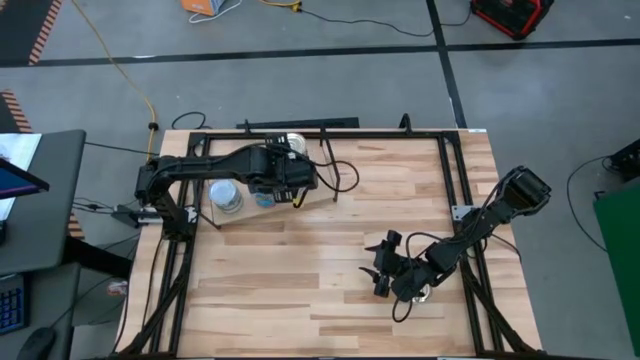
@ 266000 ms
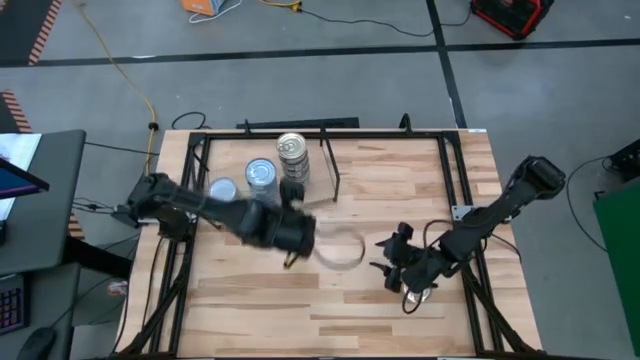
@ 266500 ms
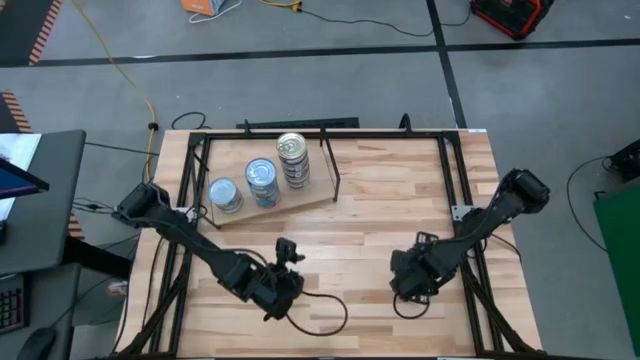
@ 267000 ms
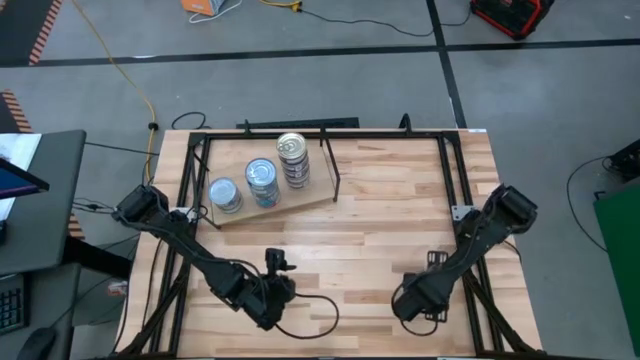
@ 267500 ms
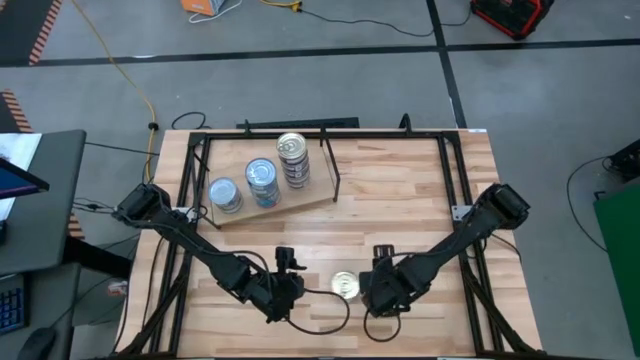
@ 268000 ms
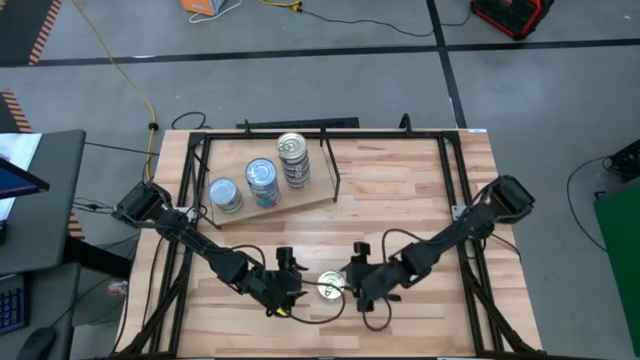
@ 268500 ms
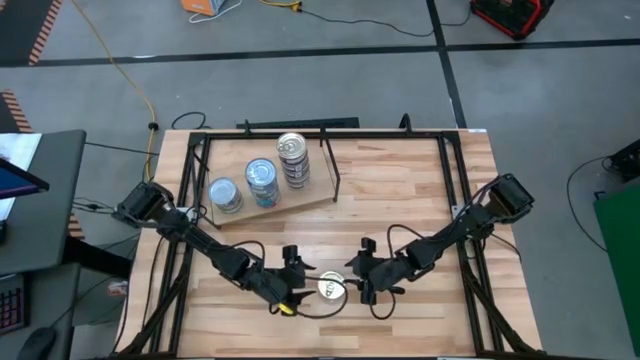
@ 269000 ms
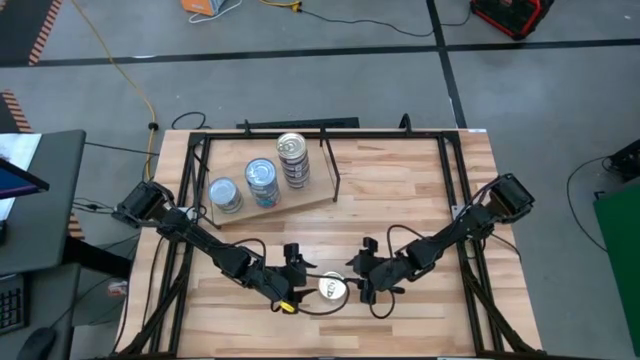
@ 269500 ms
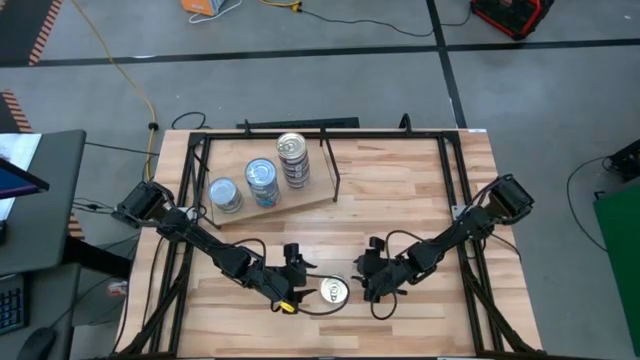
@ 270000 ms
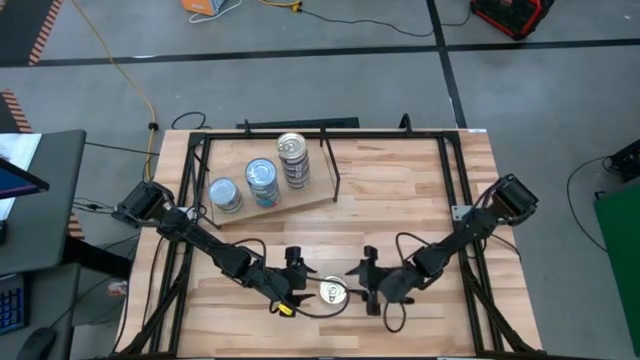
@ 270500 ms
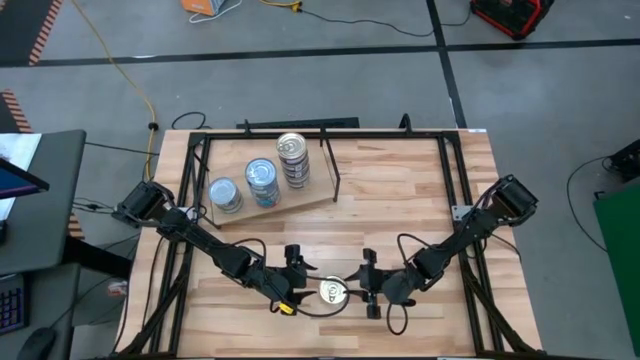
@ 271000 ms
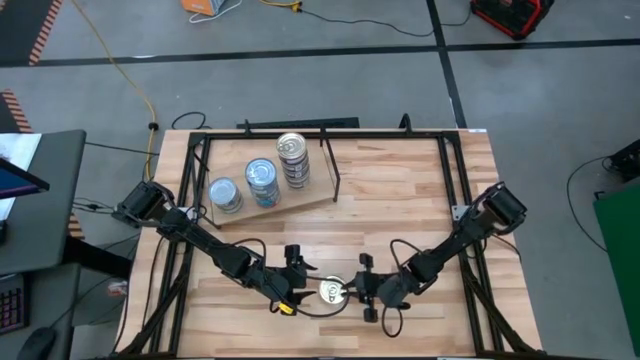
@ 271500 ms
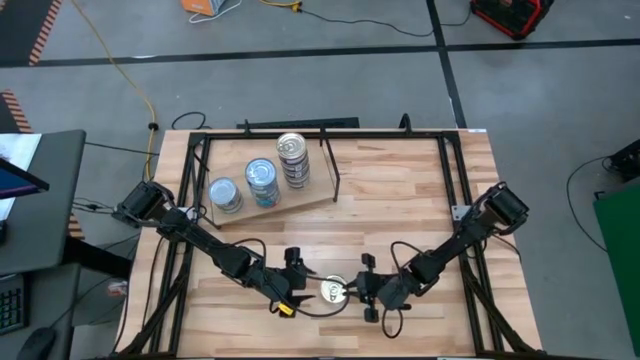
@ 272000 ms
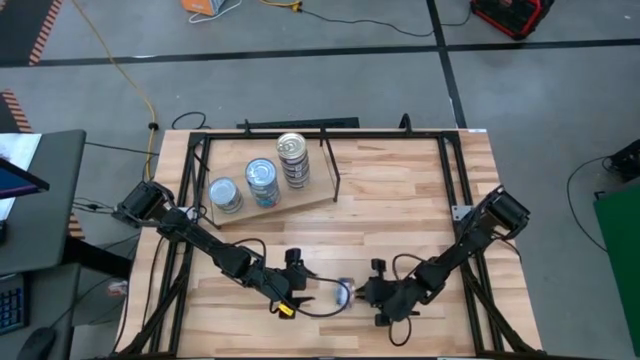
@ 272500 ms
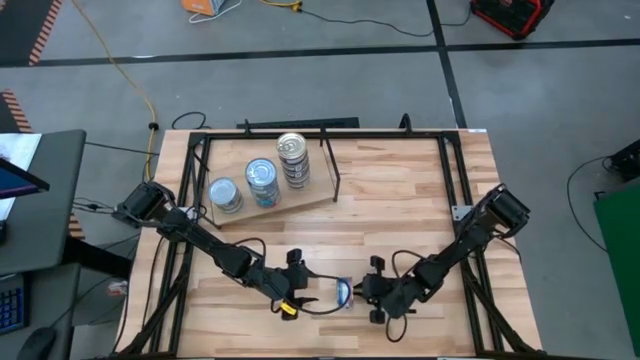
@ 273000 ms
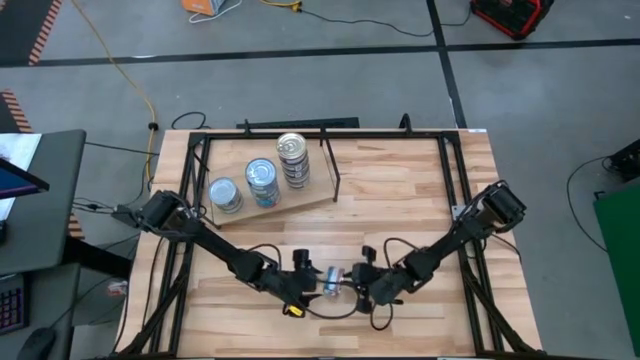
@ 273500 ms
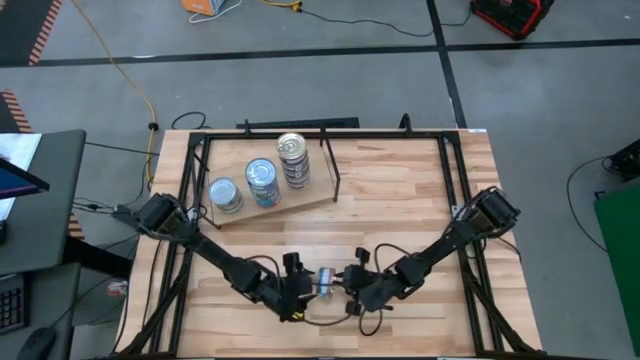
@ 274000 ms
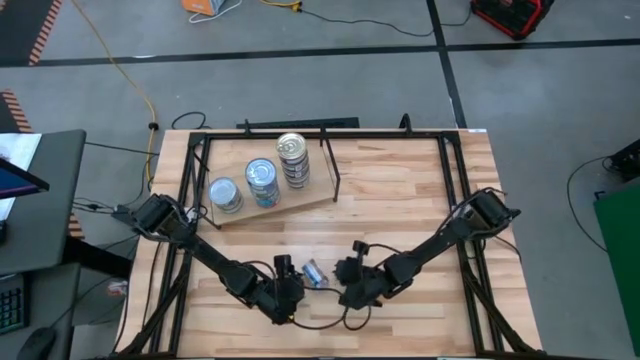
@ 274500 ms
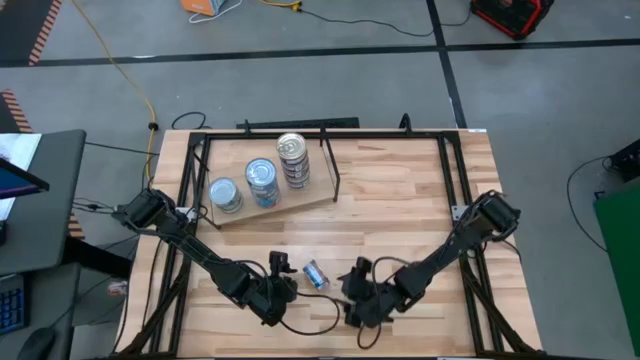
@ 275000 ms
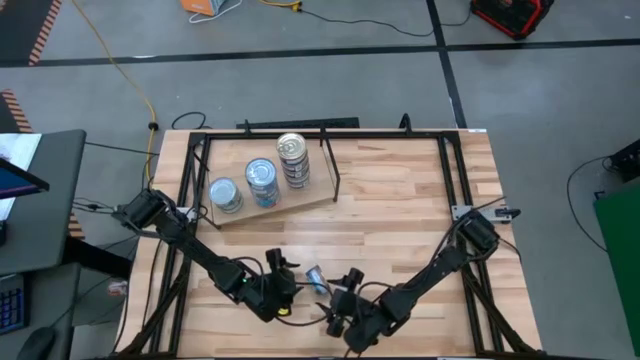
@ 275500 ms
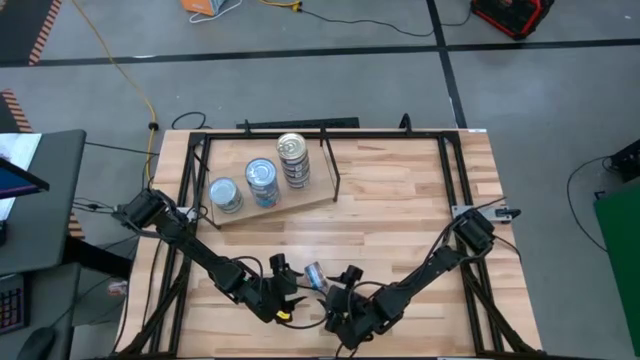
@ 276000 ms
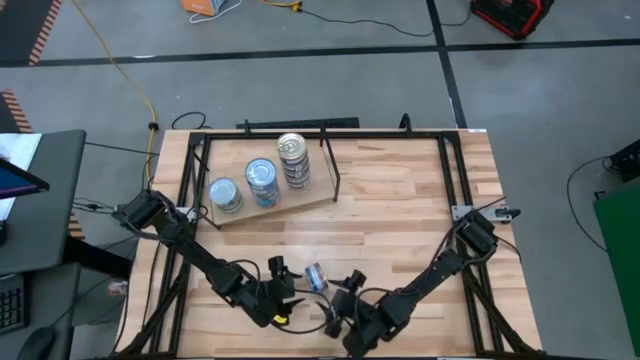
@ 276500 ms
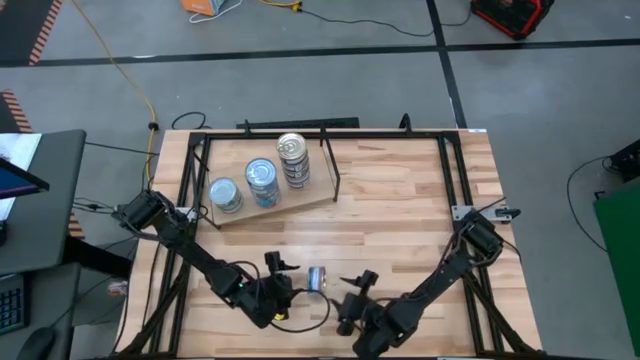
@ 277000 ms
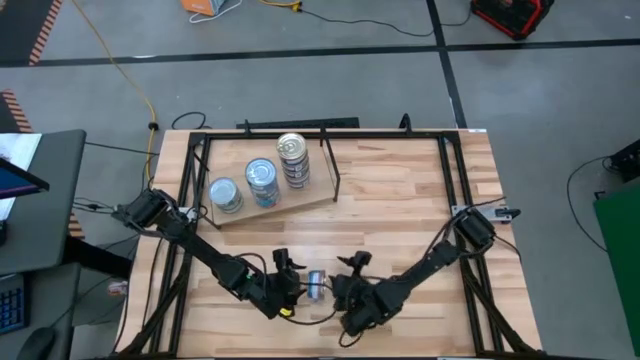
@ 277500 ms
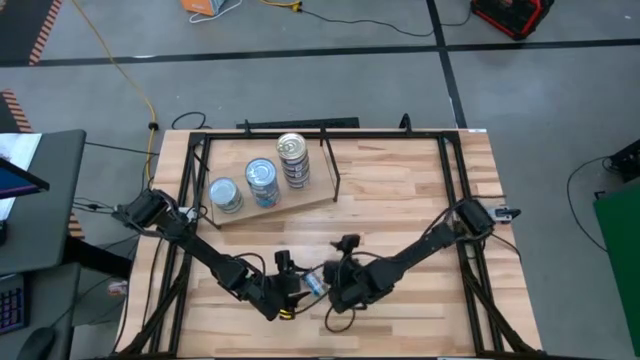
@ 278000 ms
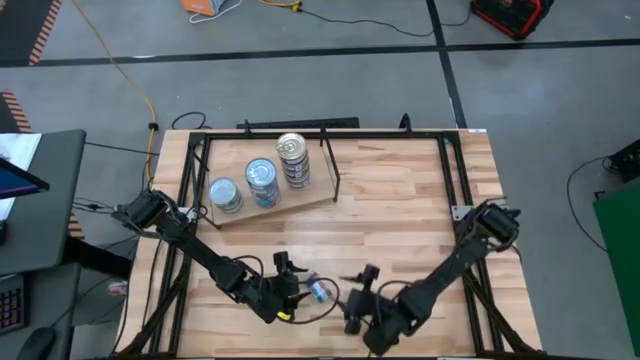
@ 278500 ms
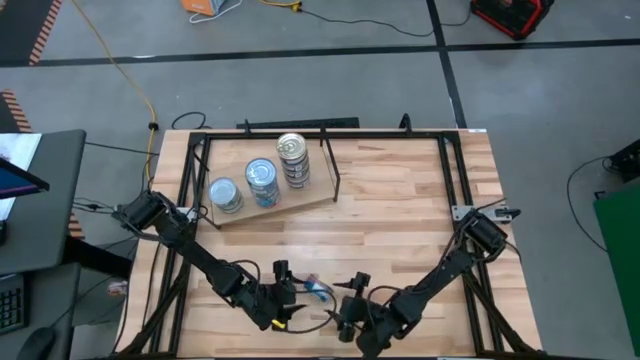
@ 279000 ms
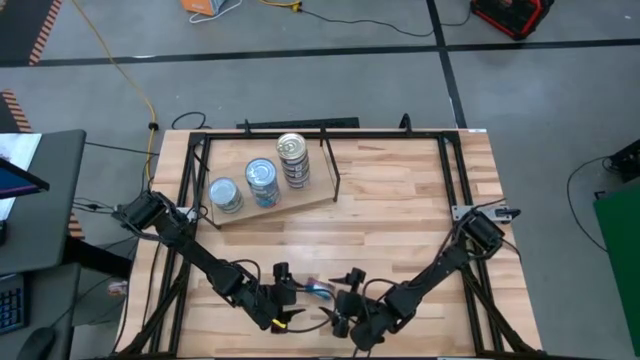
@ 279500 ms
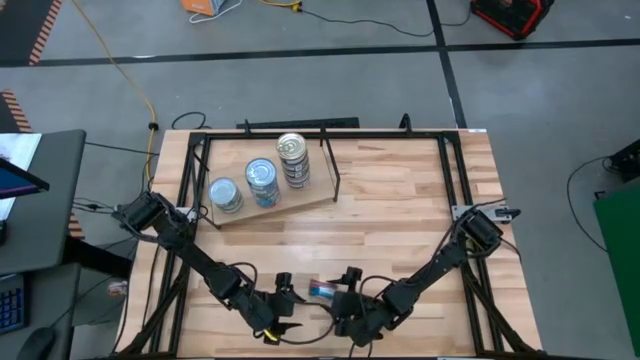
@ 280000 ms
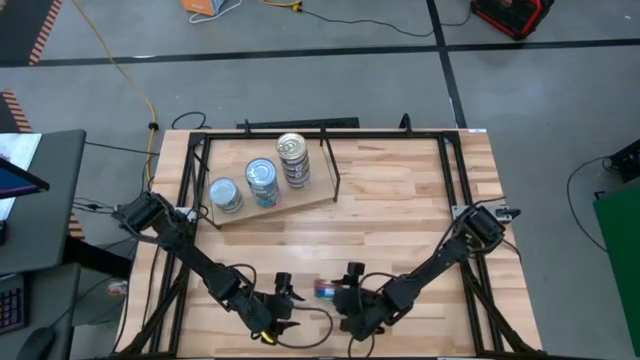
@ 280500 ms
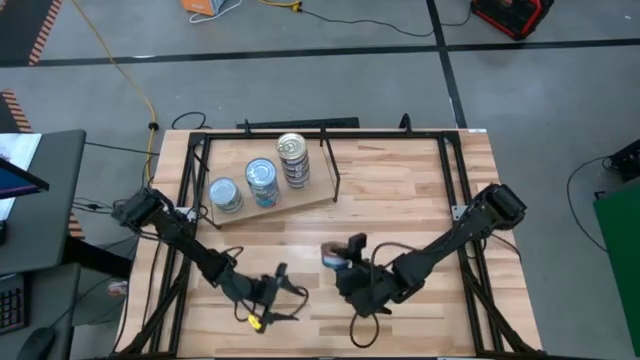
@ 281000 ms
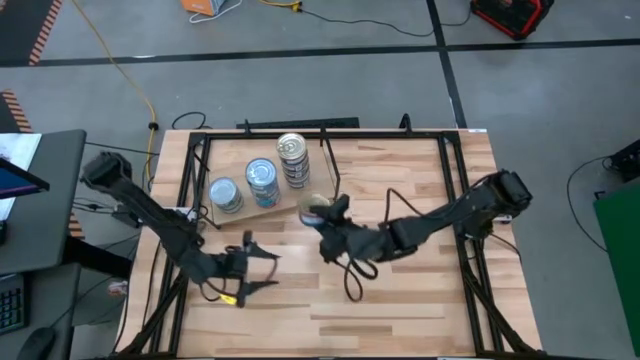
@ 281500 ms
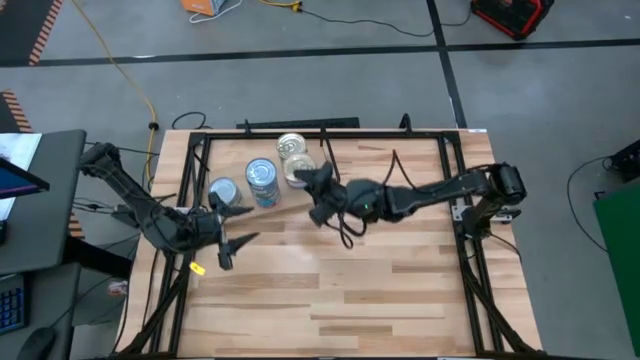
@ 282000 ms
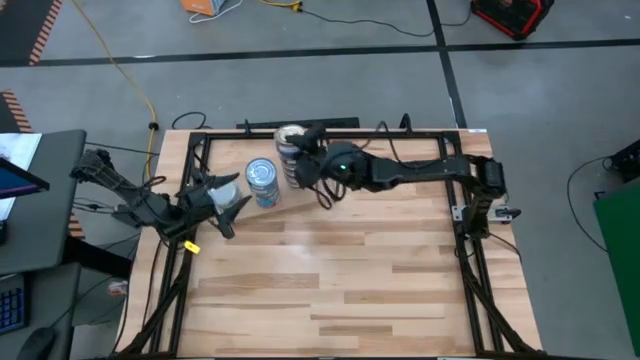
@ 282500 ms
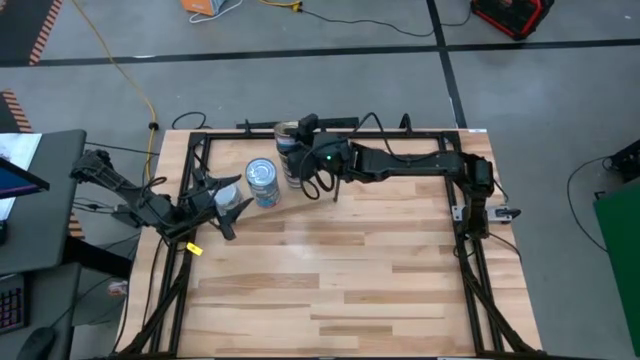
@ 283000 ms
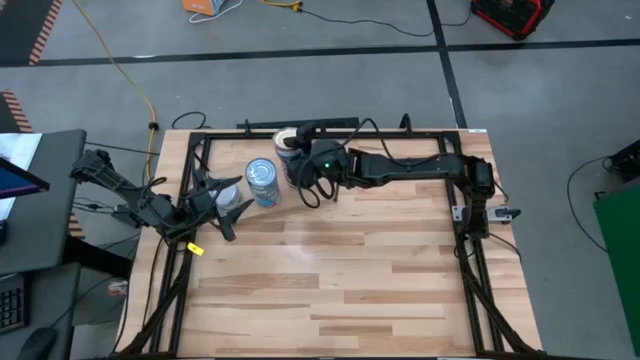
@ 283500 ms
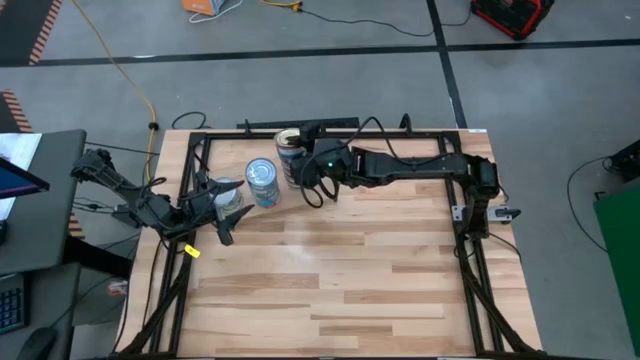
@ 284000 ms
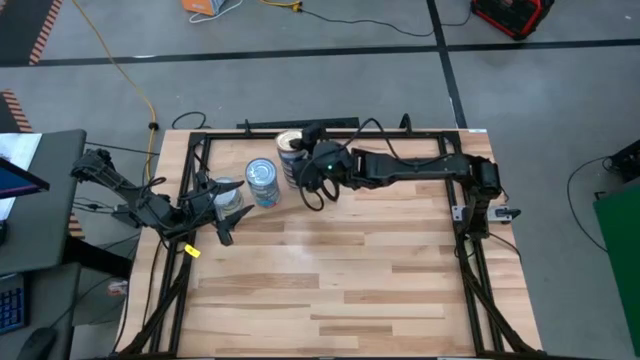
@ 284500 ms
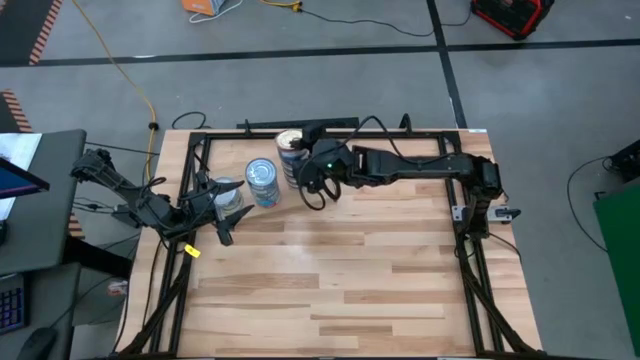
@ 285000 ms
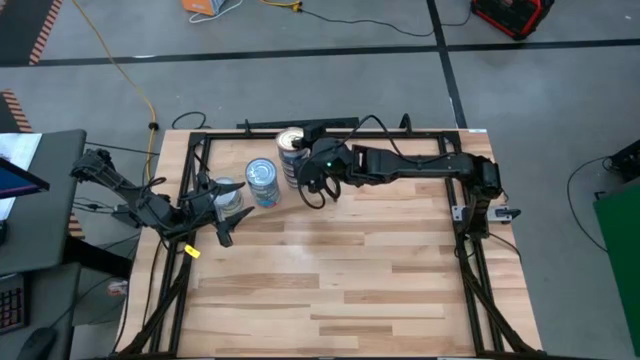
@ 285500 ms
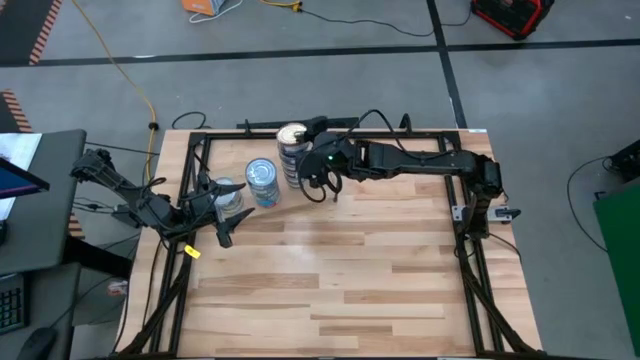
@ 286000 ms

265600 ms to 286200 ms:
Task: Stack canned seafood by type on shelf
Stack the blue pink tuna can on top of the blue pink tuna can on the shelf

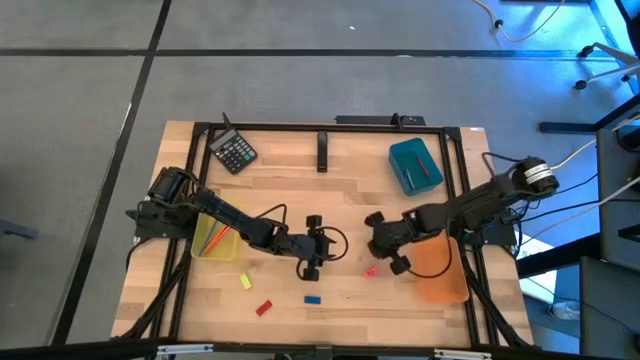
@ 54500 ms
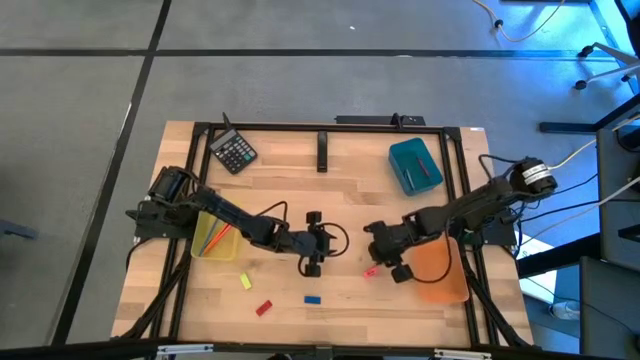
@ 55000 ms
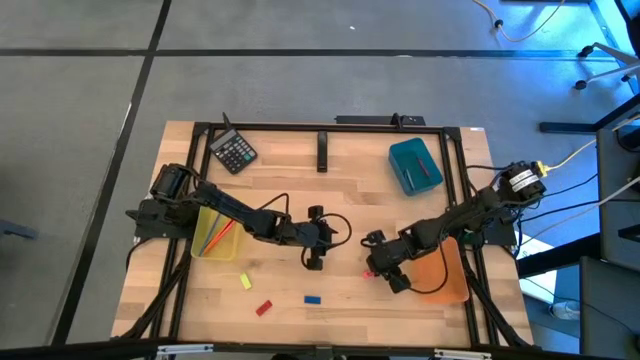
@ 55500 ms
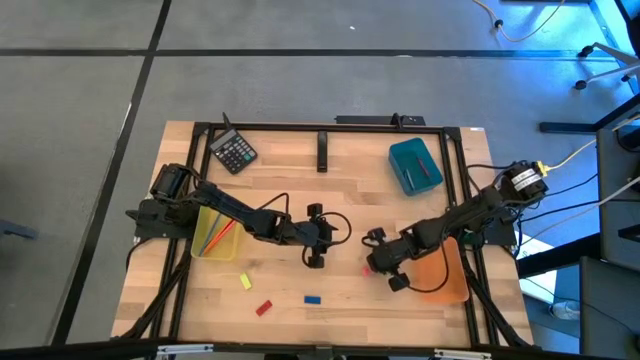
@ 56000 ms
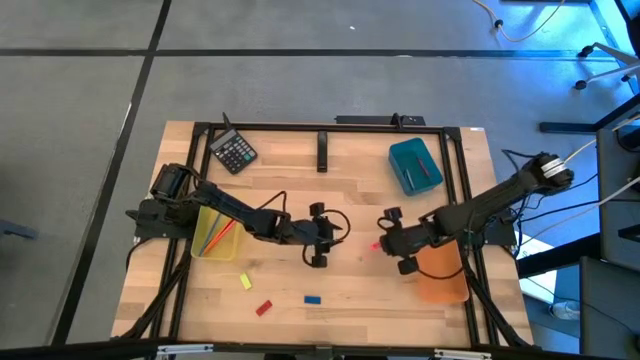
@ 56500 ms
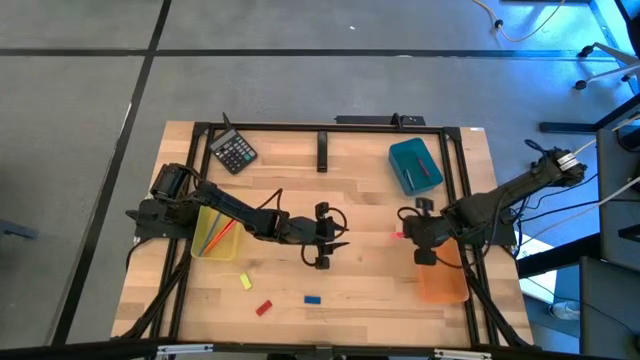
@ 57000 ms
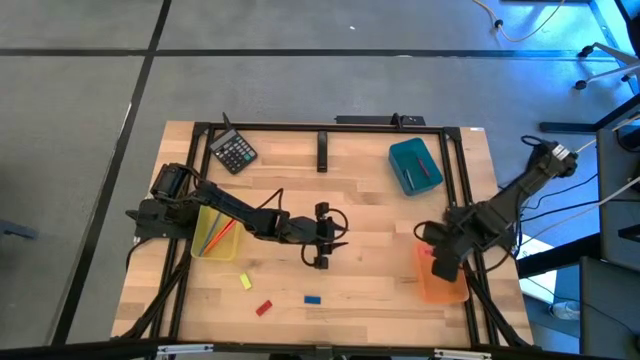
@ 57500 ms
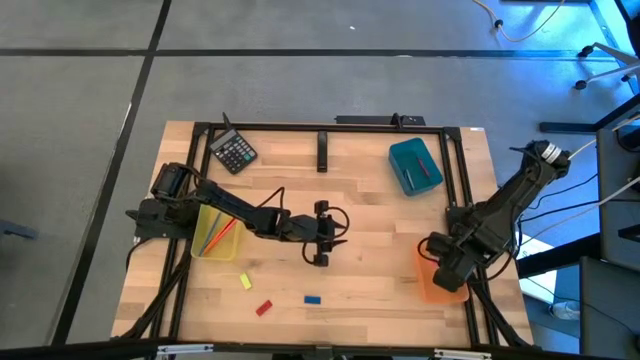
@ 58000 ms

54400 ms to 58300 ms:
Task: Sort crayons/erasers/pens/pencils in bins
Put the pink eraser into the orange bin
